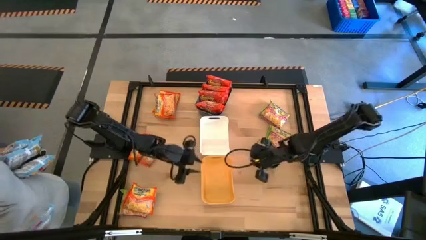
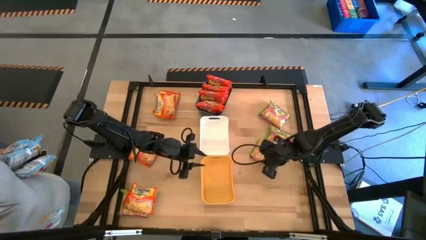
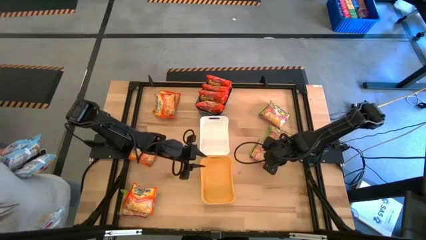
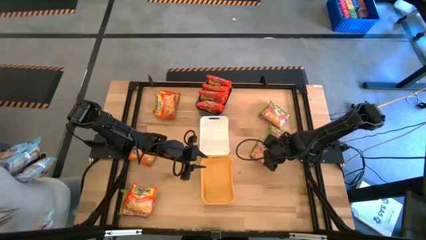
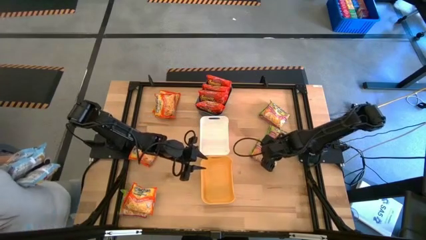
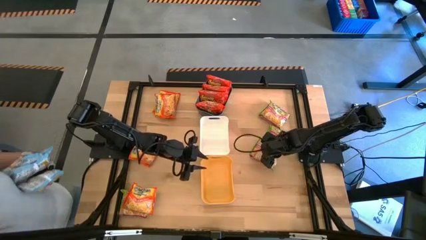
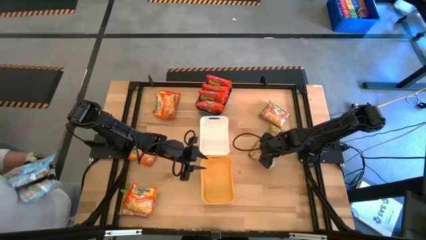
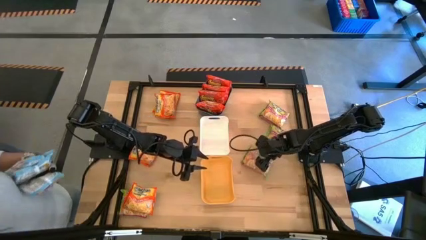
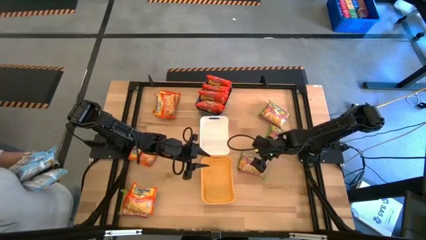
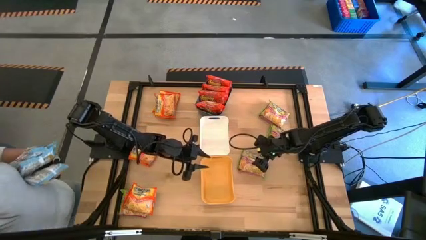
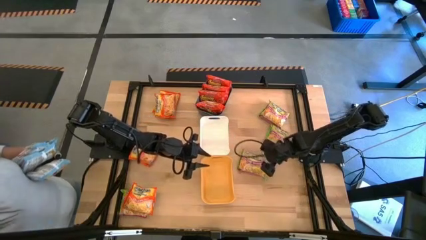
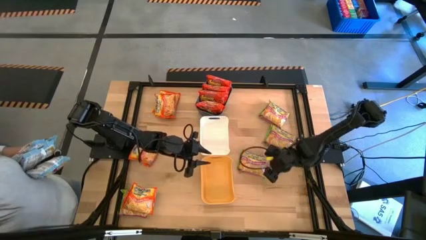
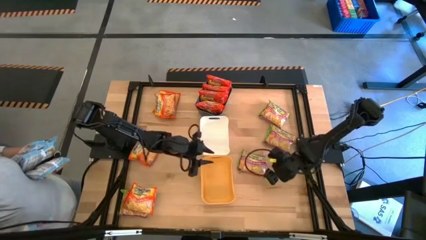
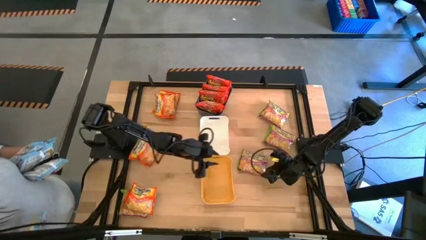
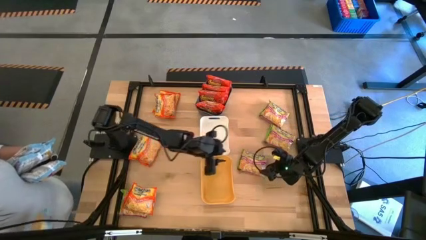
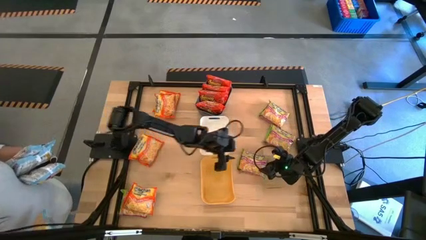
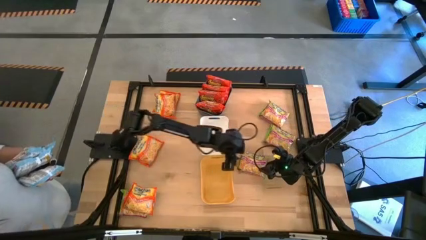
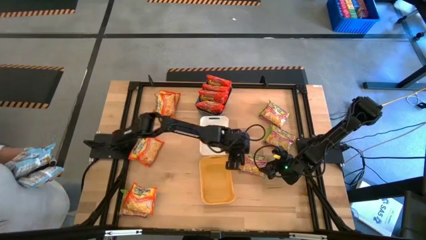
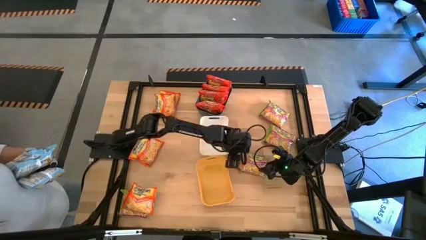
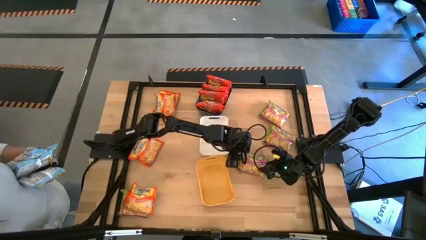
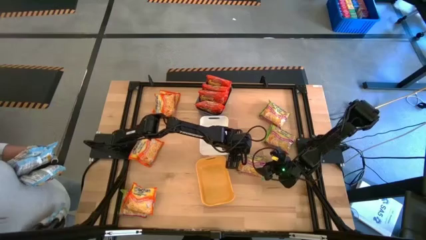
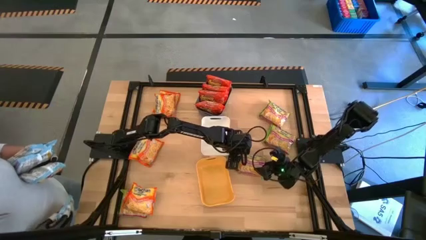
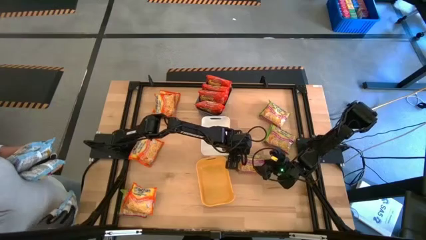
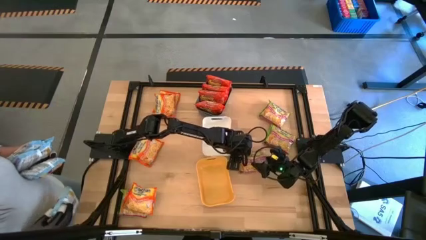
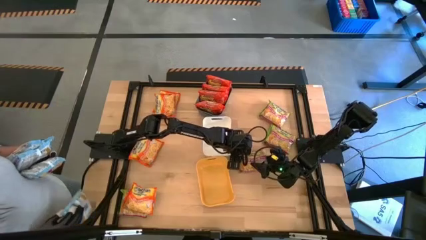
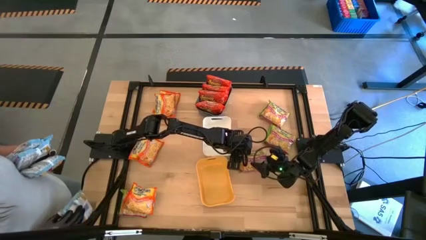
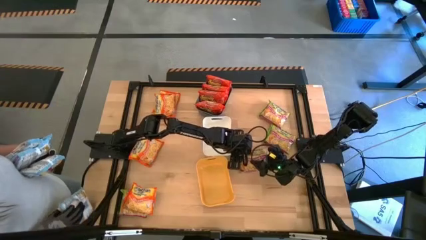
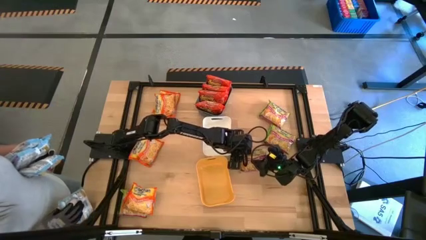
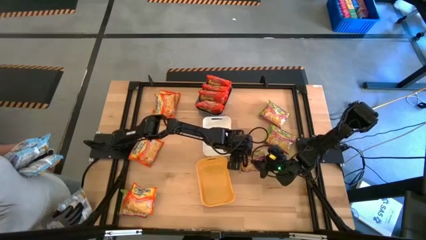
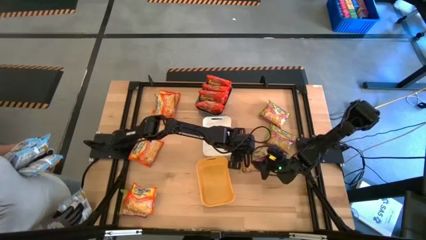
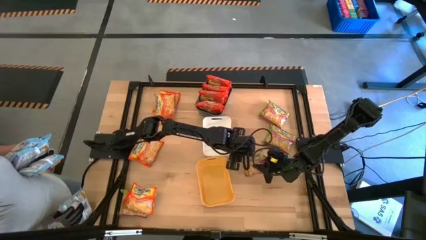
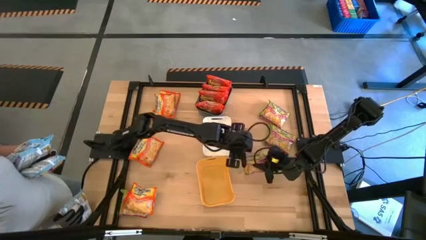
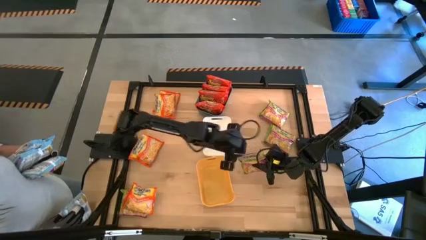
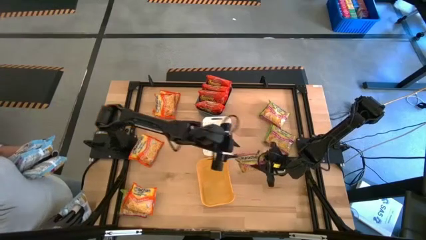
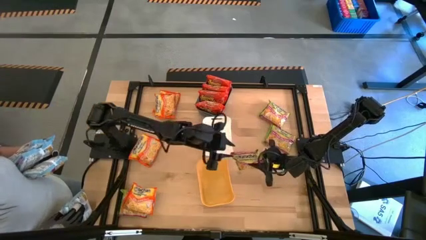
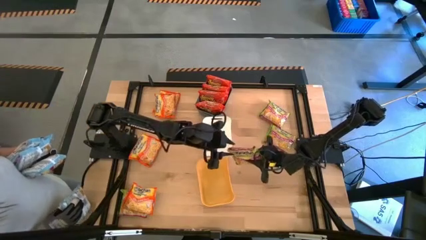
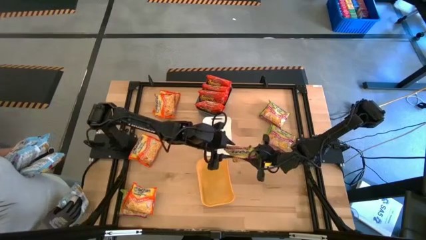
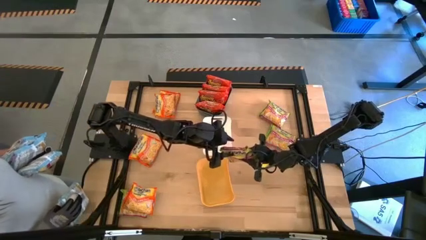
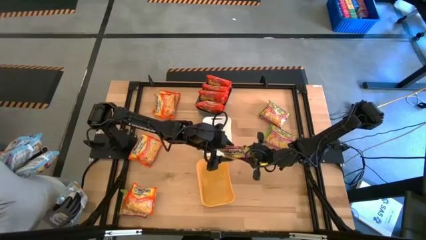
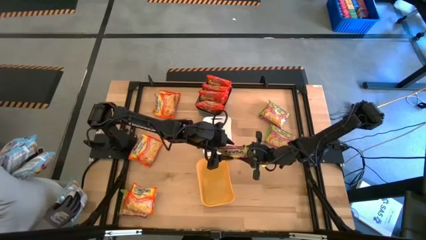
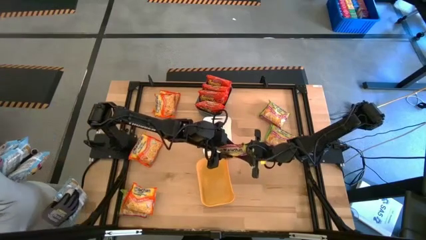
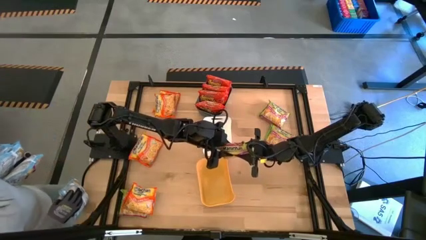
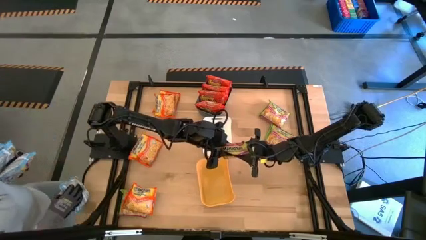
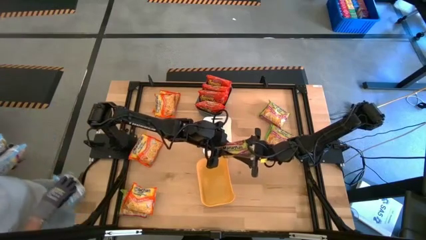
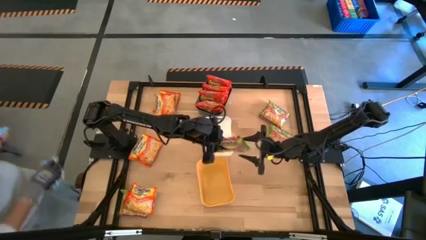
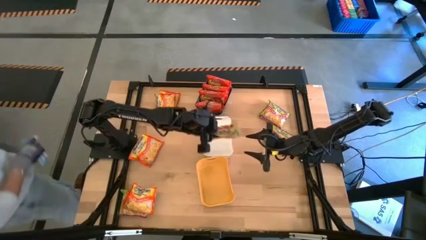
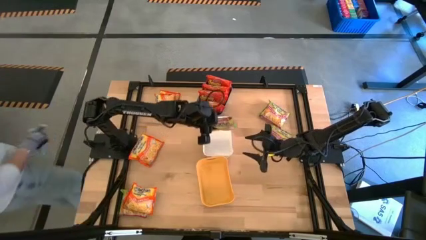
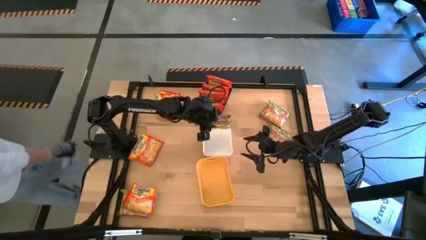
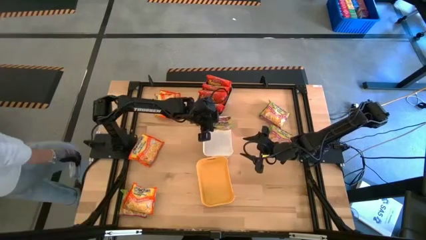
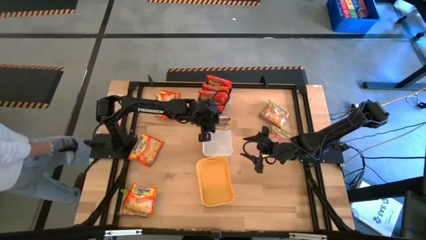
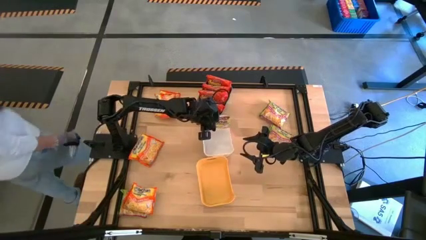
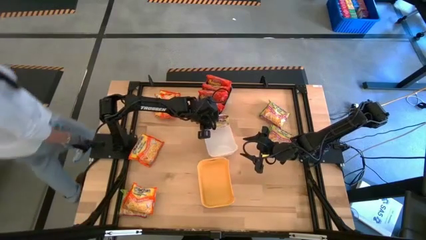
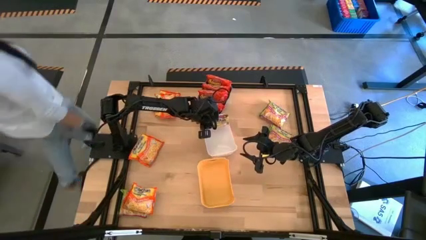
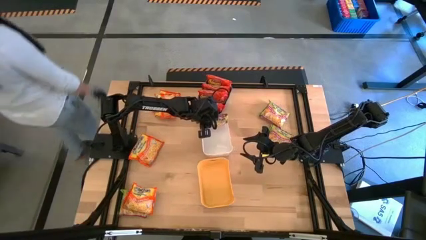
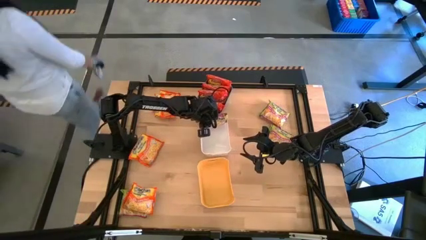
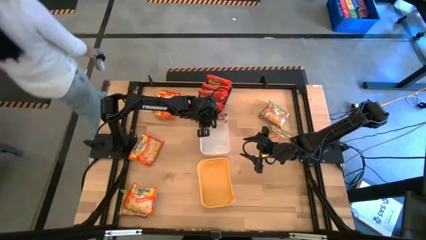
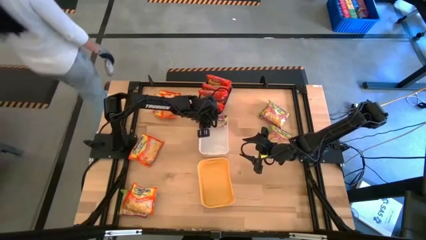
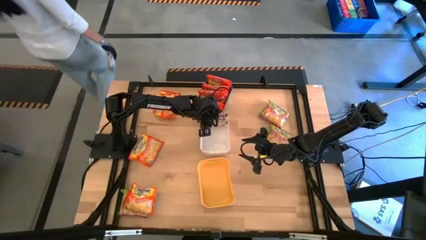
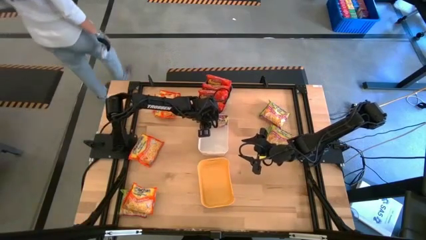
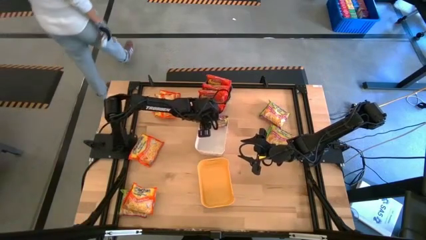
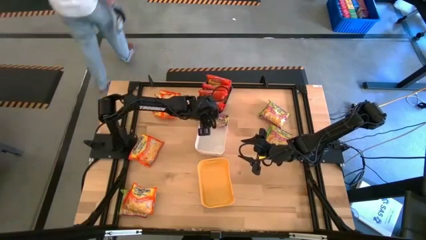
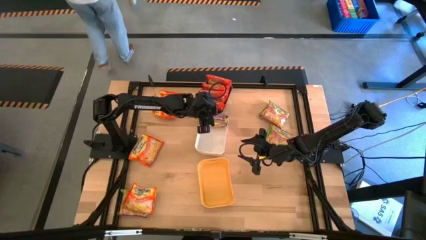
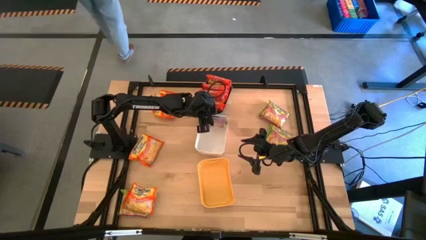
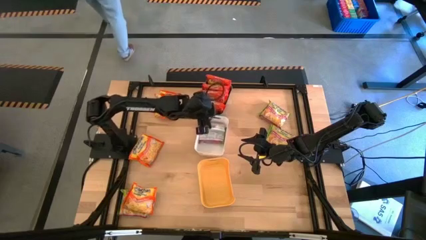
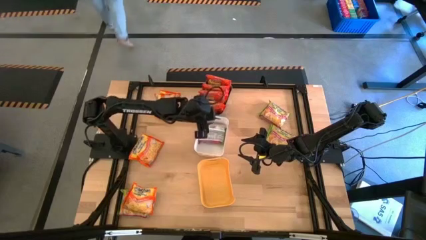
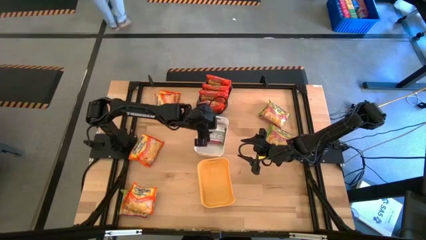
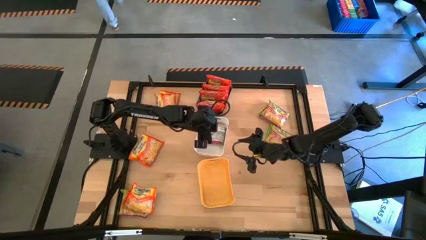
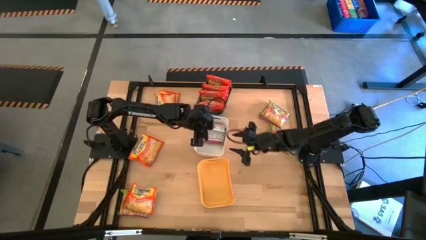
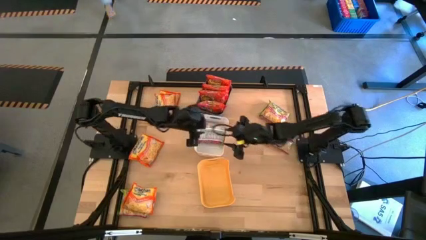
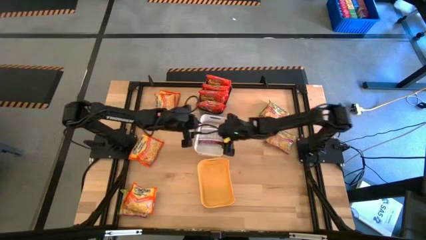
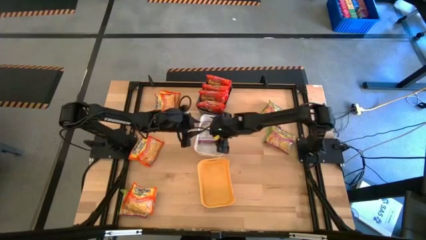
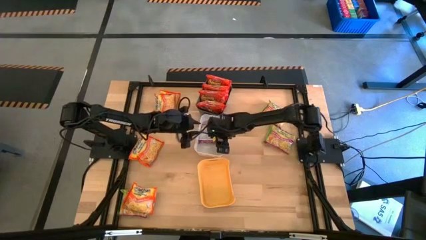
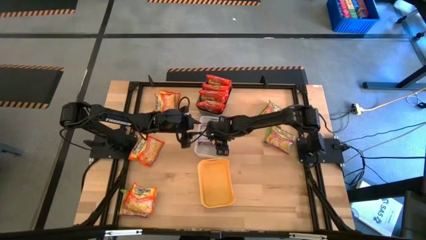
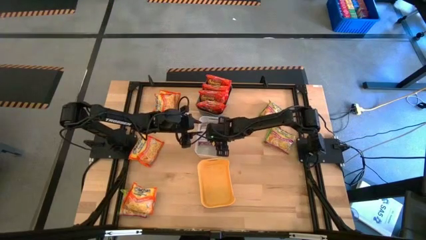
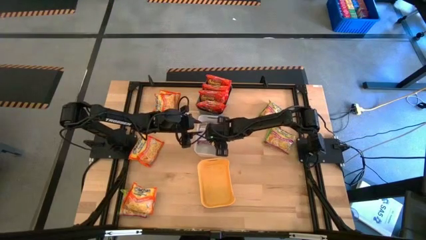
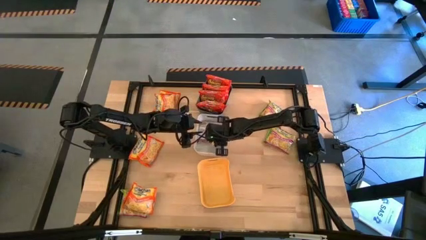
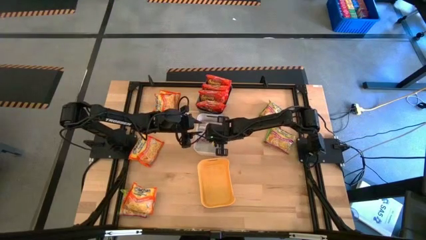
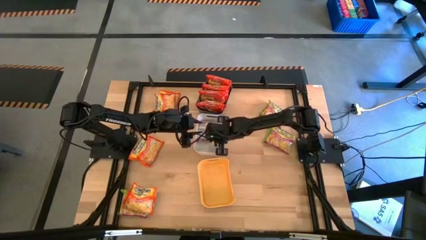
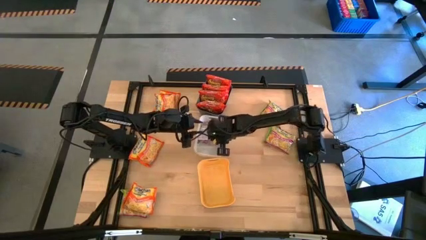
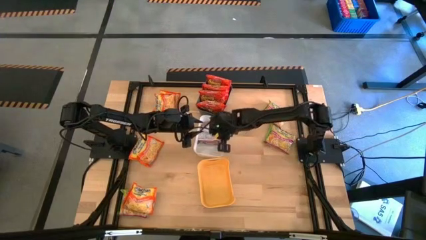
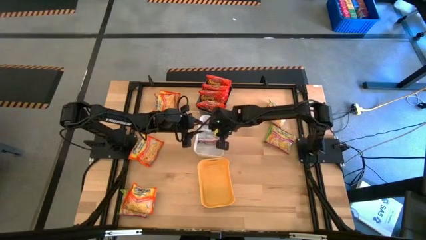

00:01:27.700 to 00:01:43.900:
Task: Sort Maruchan noodles
Put the green noodle pack into the white bin
